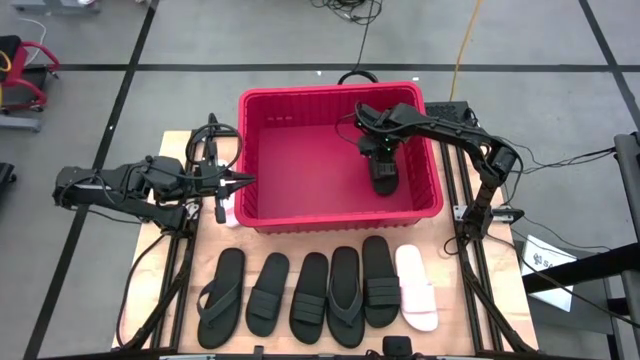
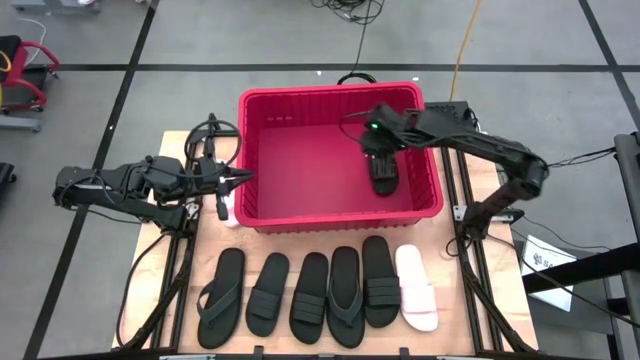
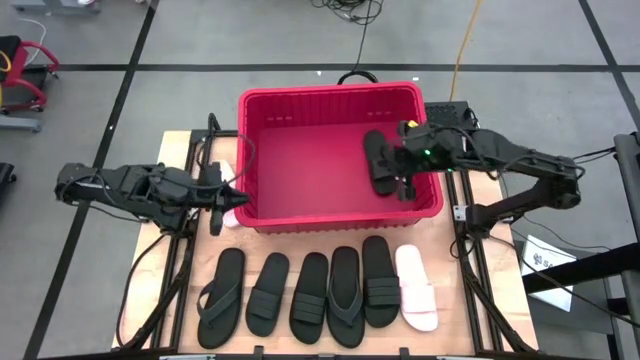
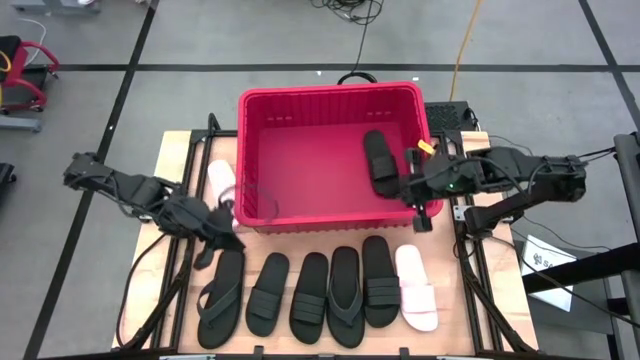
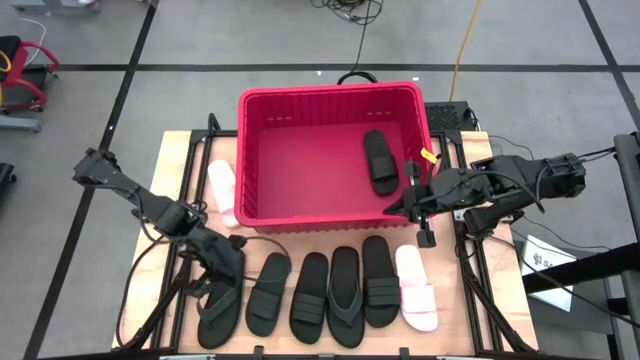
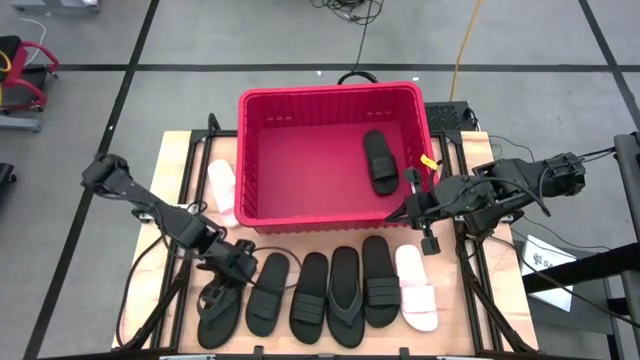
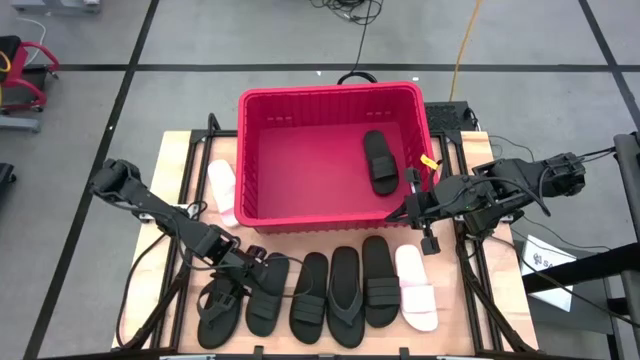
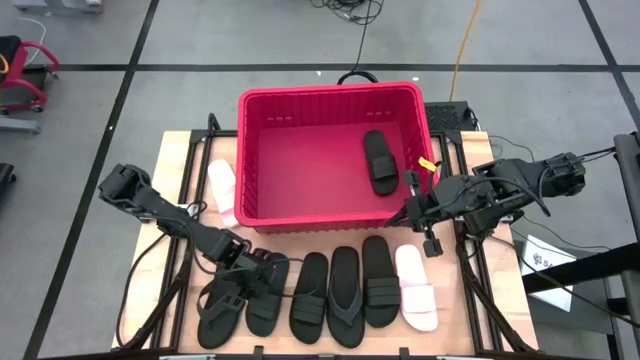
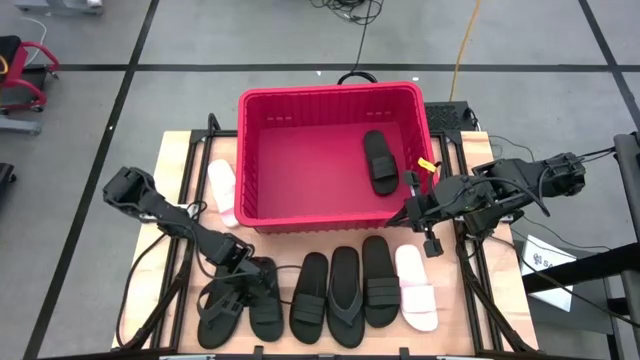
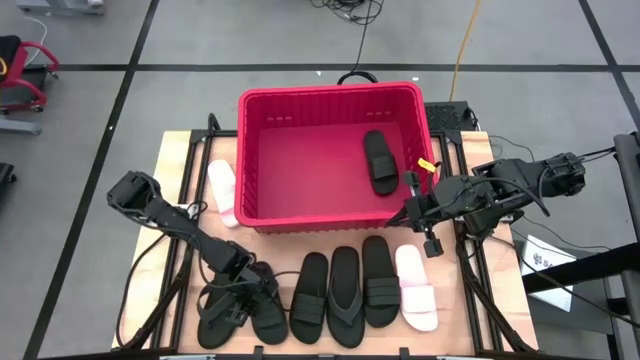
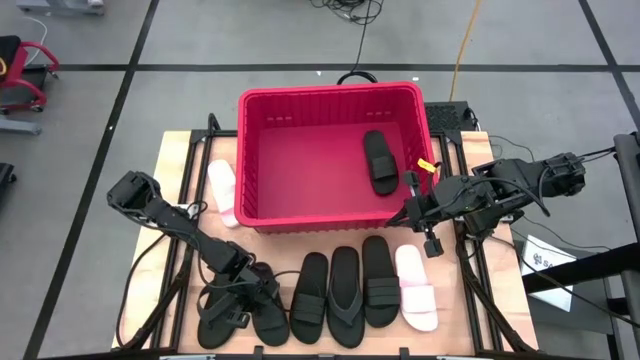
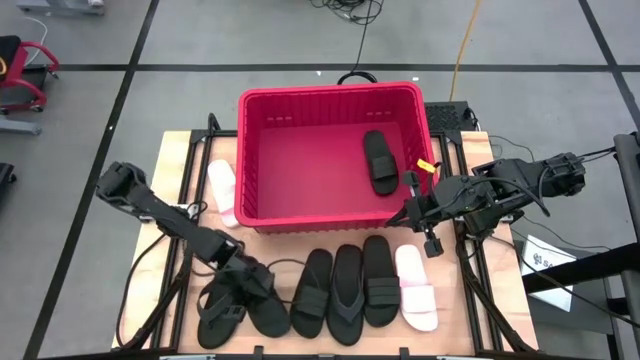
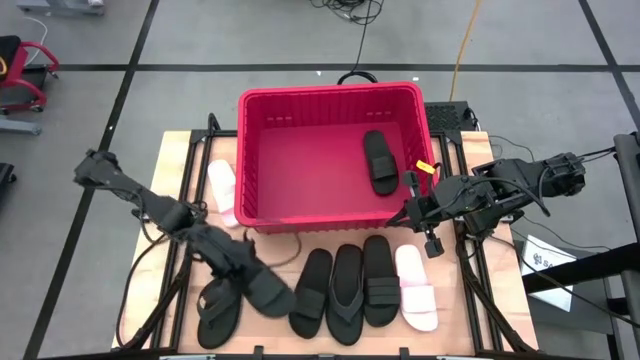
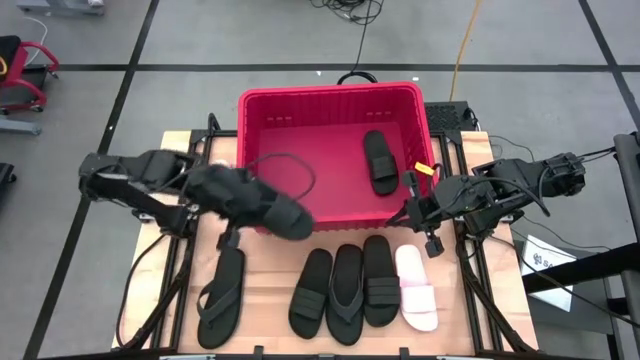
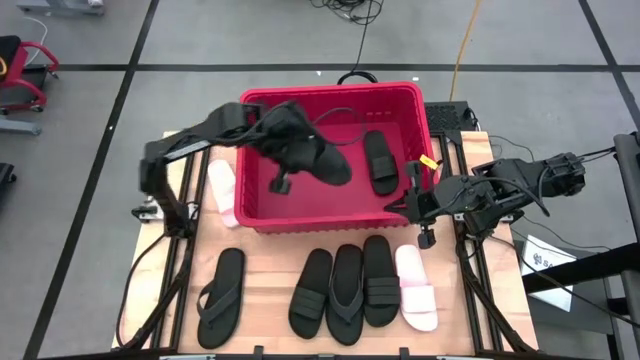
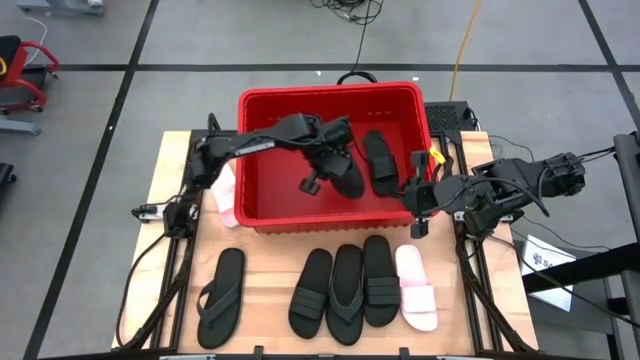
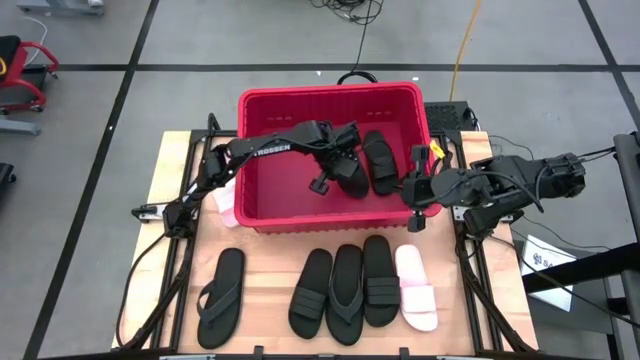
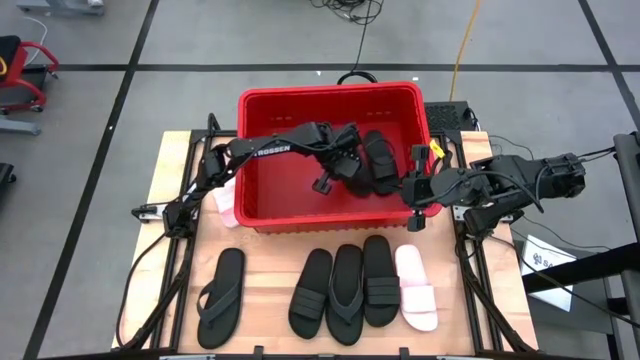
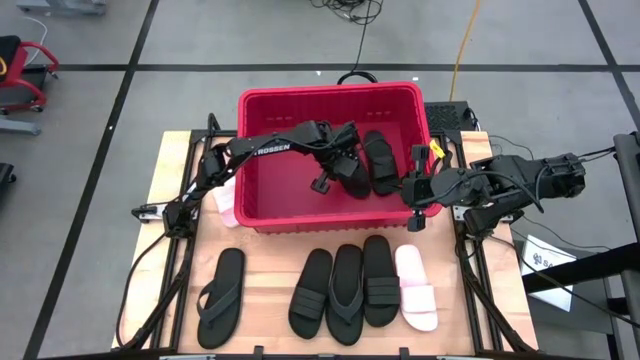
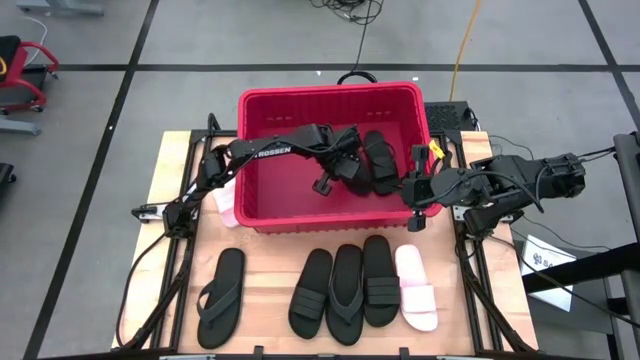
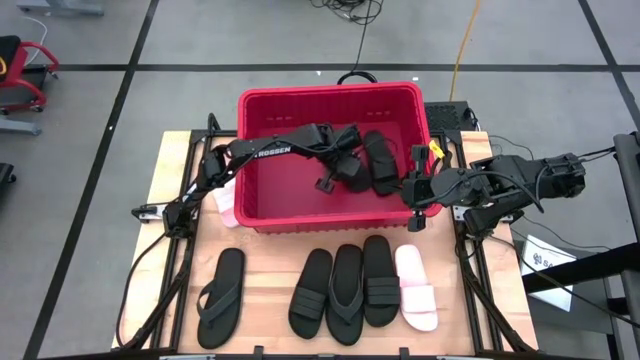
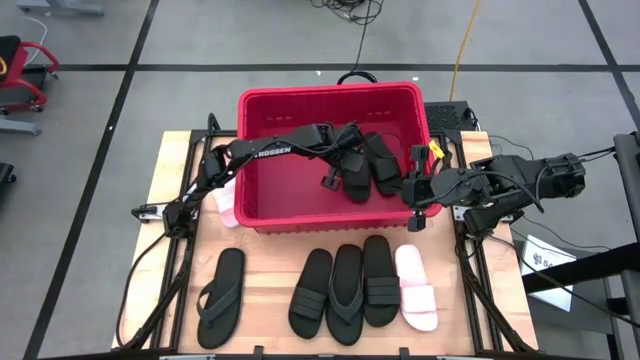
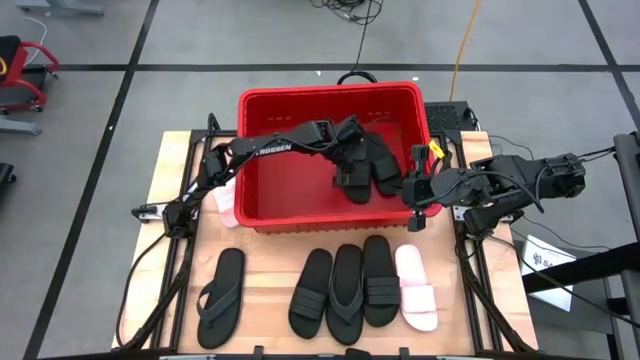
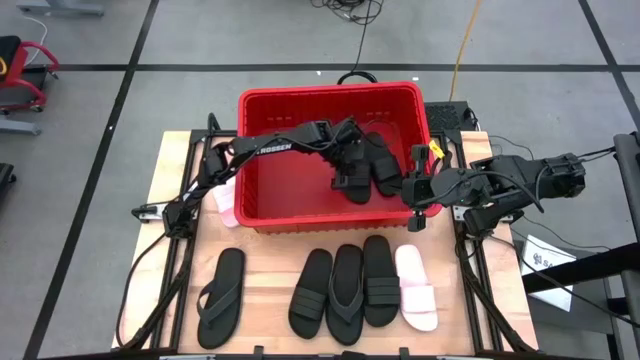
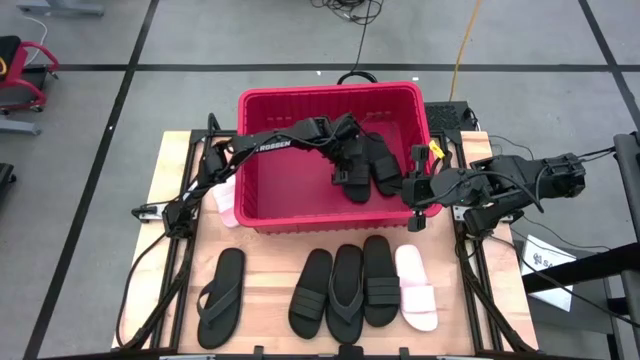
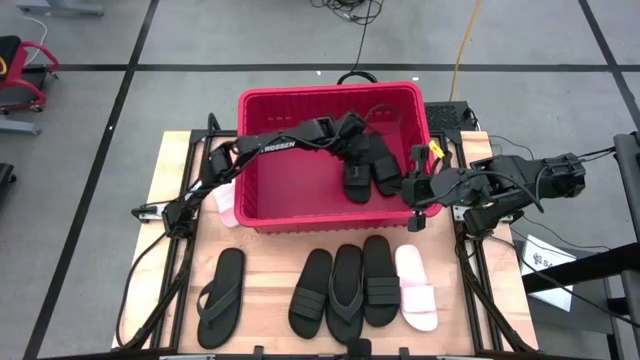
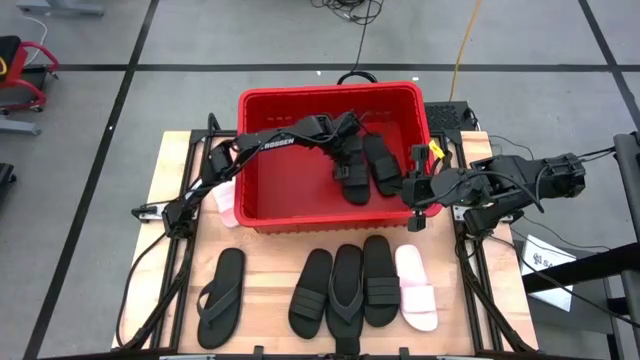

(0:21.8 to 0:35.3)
Task: Pick and place slides into bin
Put the black slipper into the red organizer bin

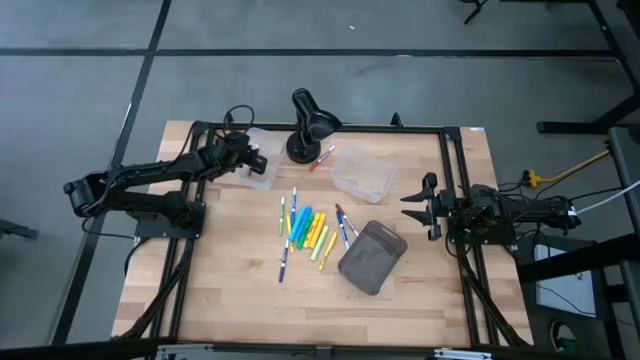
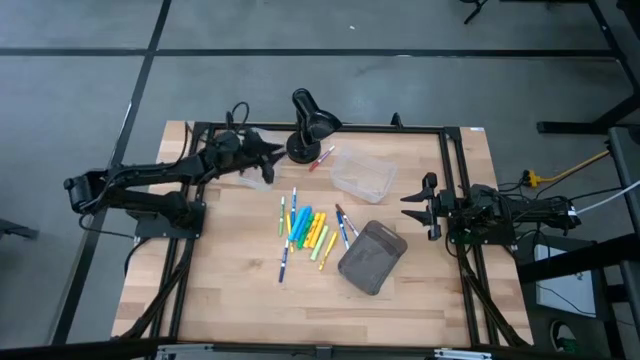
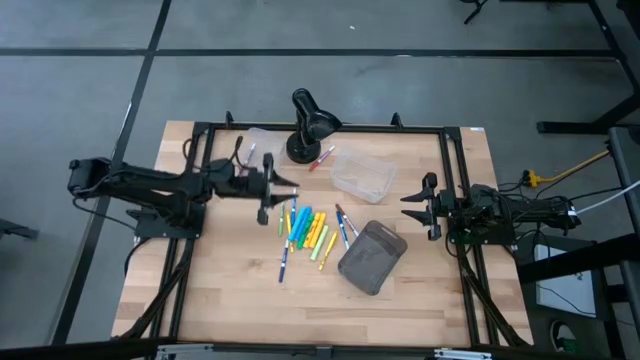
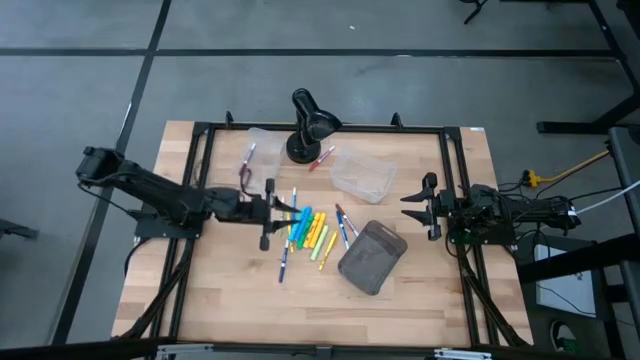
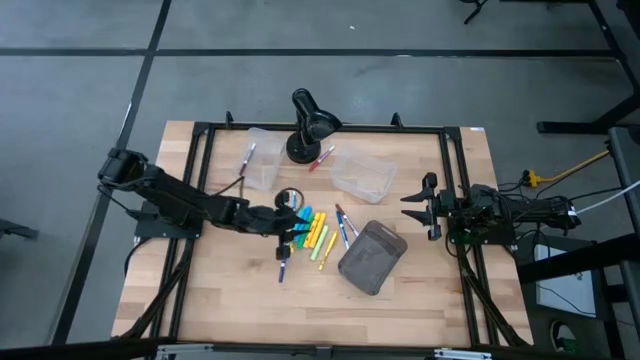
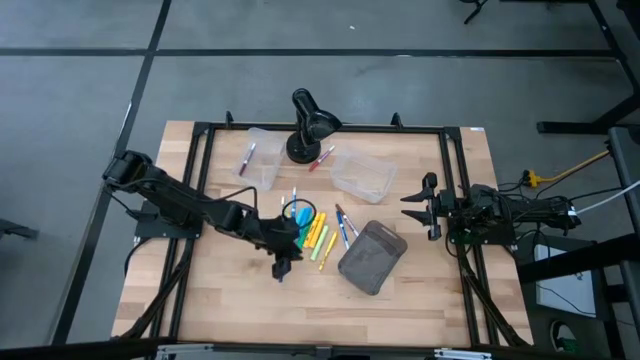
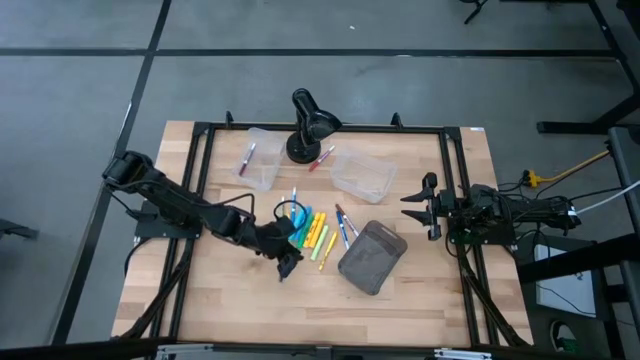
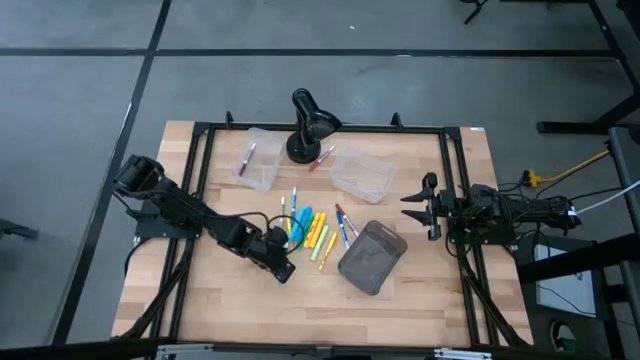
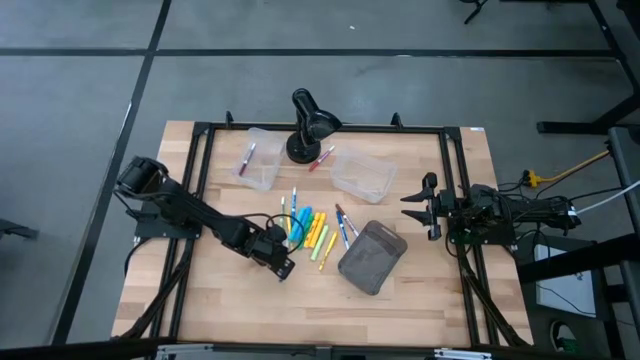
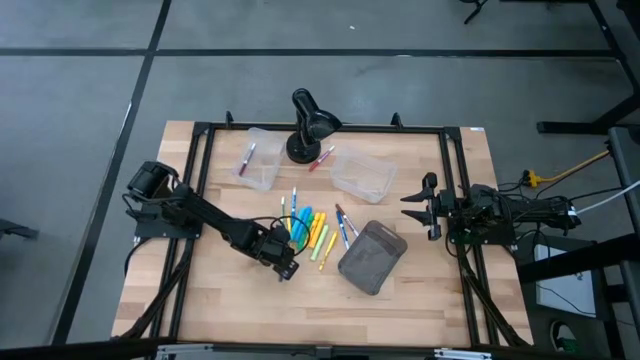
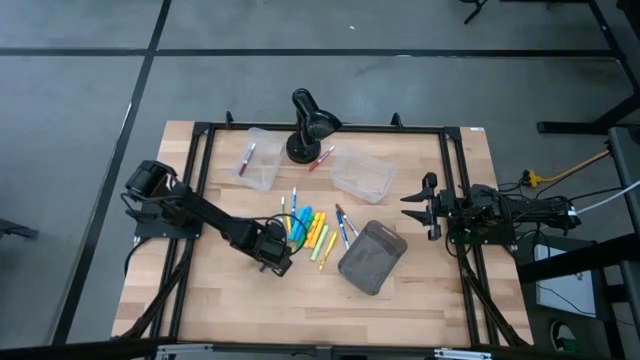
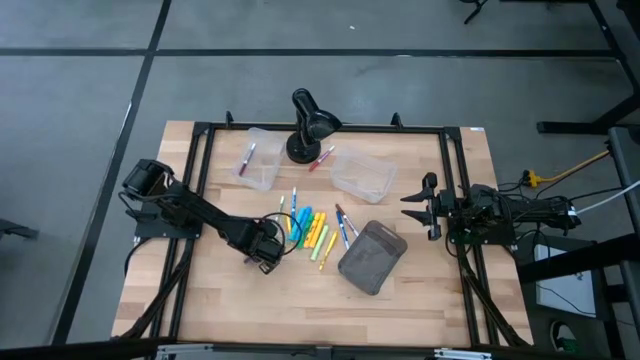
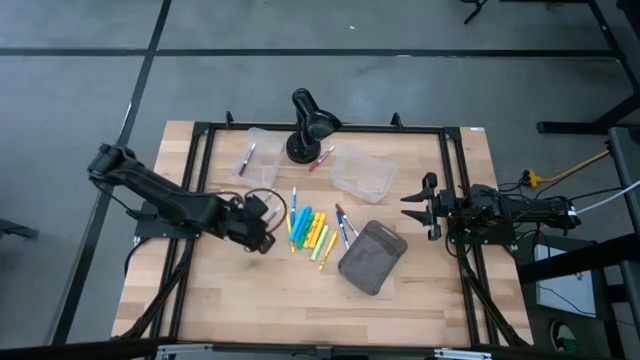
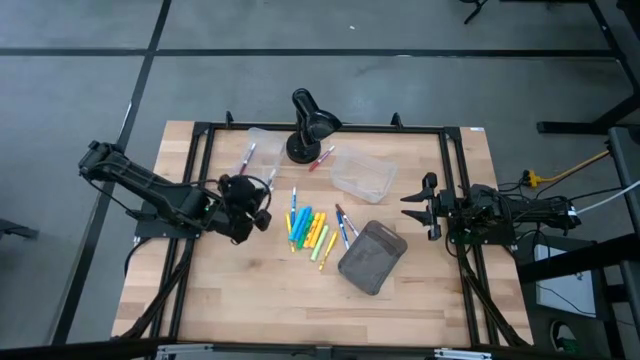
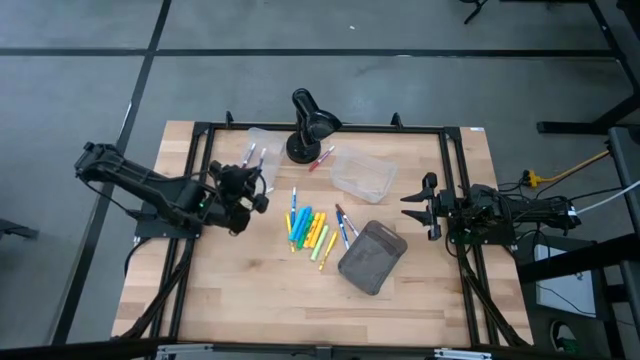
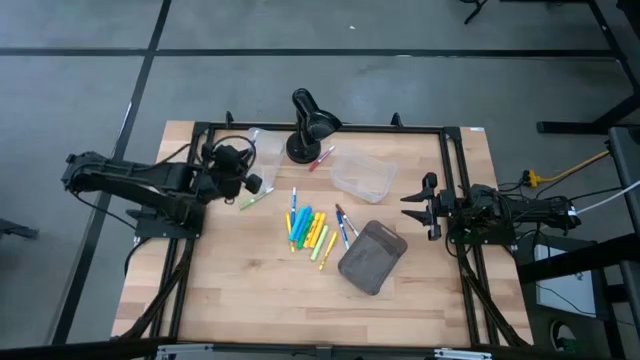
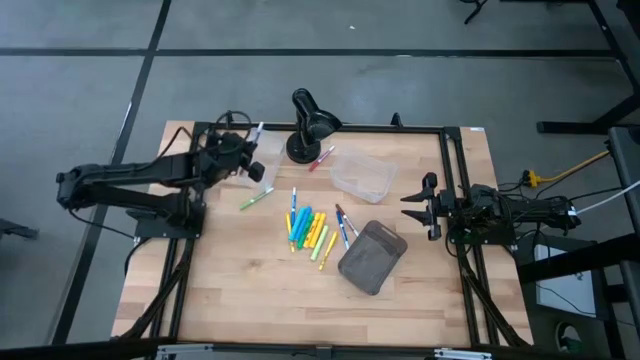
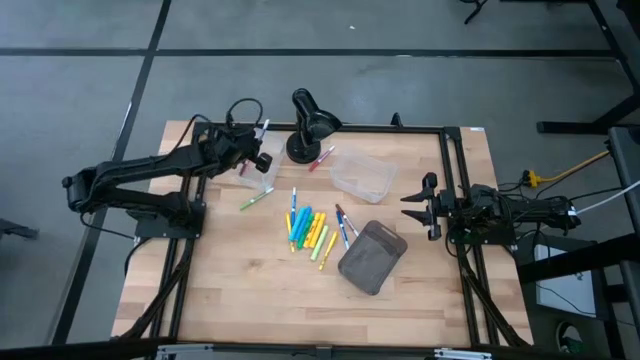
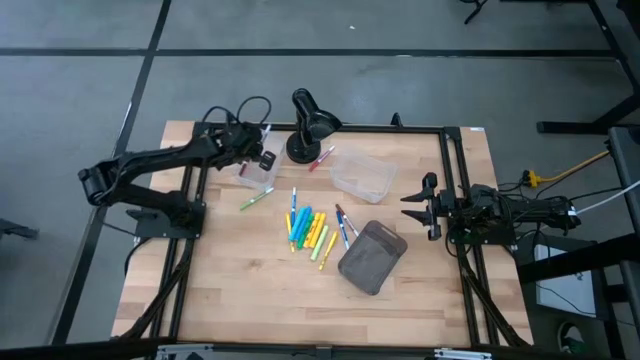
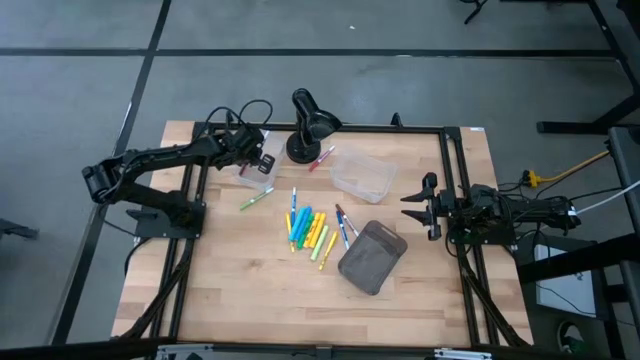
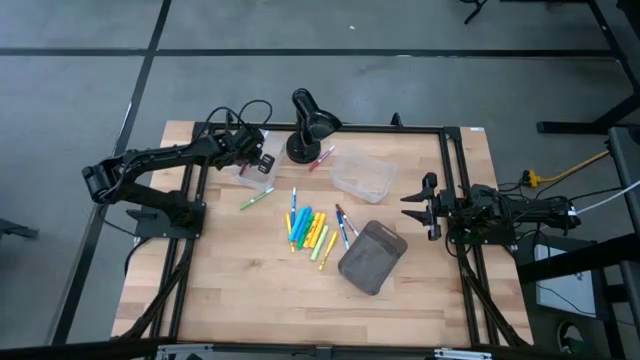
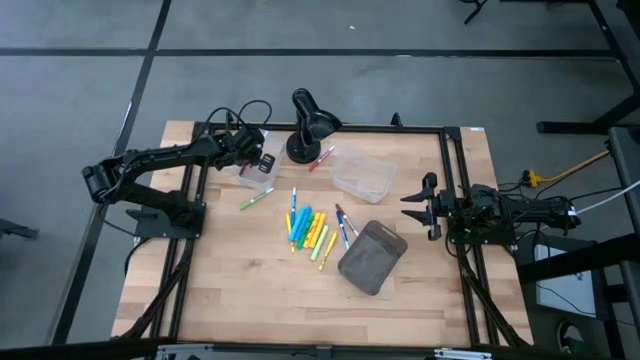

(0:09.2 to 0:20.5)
Task: Pick & Place Markers
Put the dark blue marker pen into the left transparent bin
